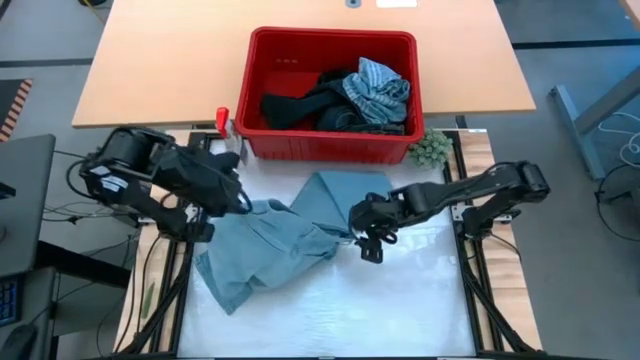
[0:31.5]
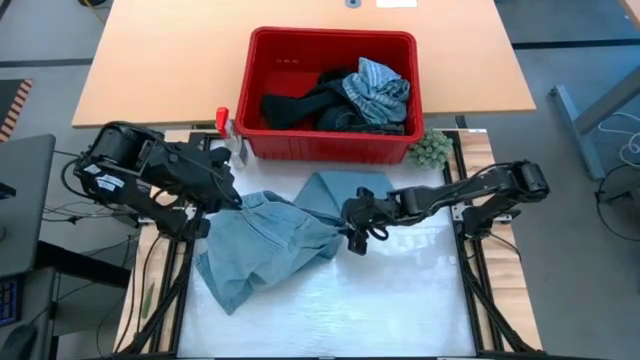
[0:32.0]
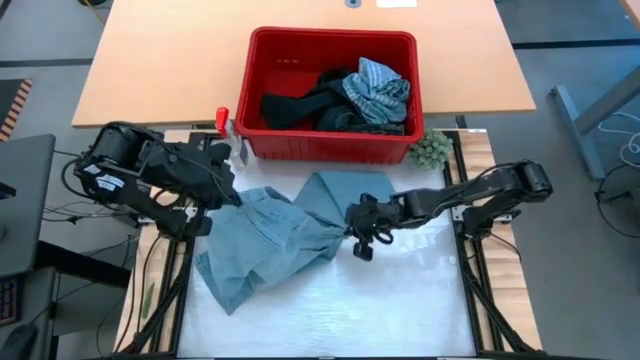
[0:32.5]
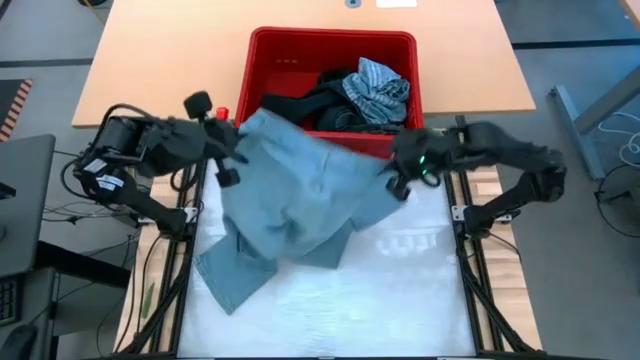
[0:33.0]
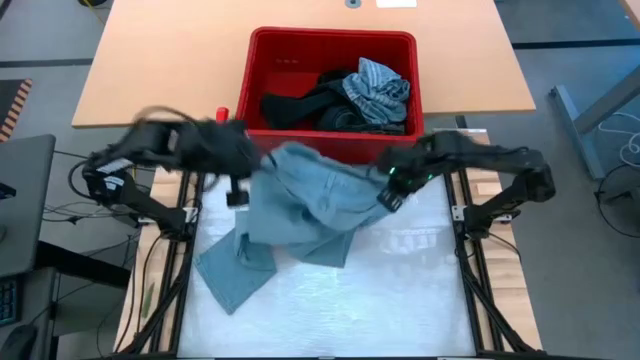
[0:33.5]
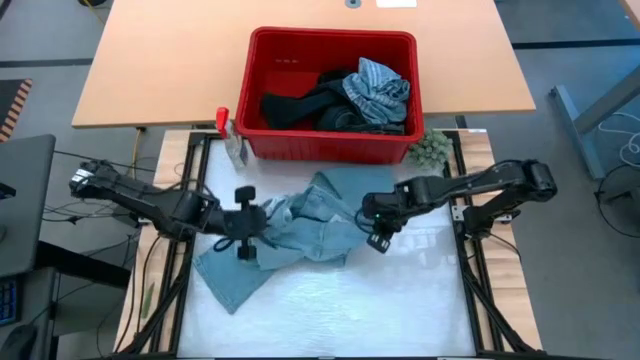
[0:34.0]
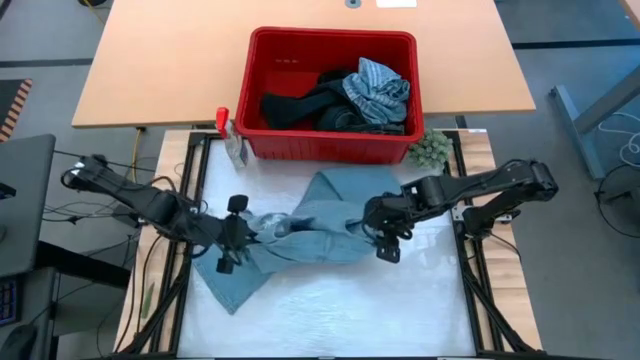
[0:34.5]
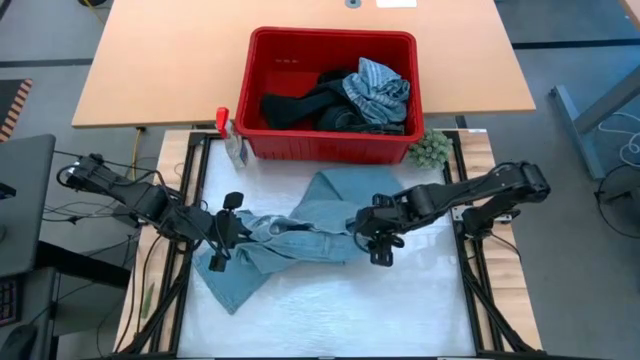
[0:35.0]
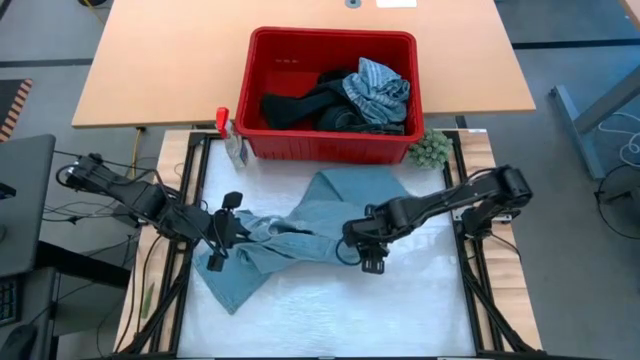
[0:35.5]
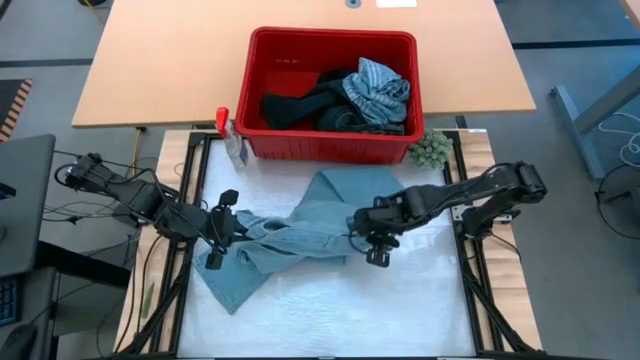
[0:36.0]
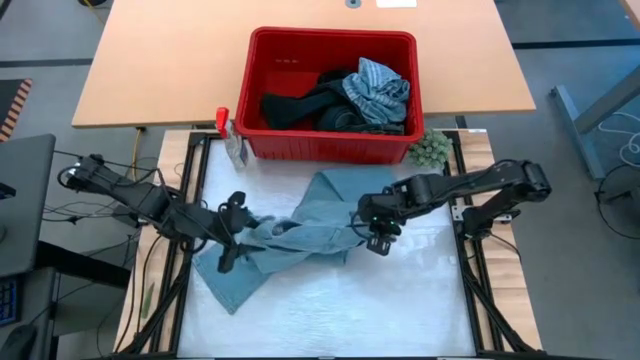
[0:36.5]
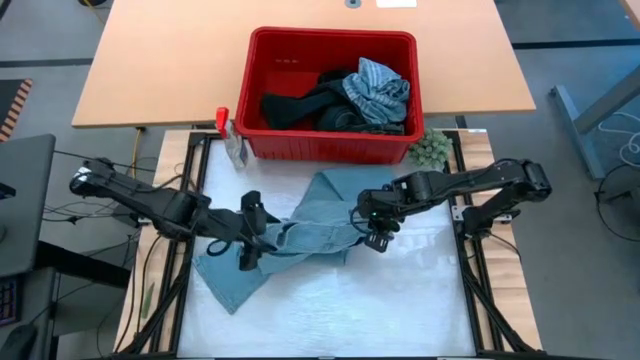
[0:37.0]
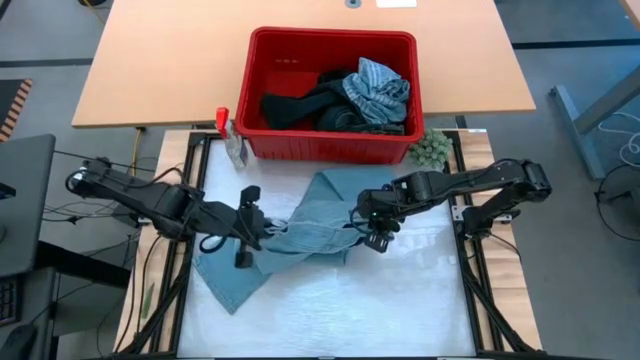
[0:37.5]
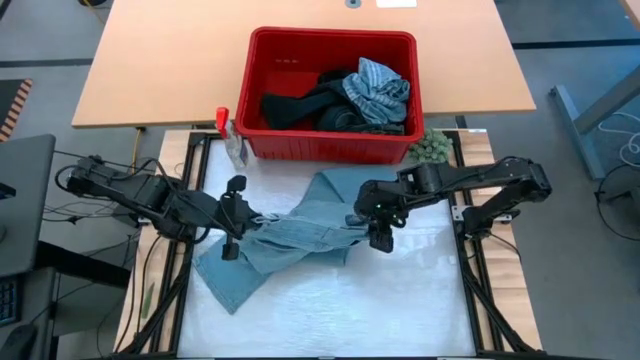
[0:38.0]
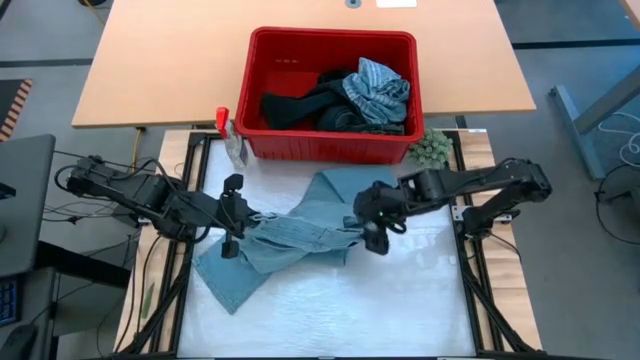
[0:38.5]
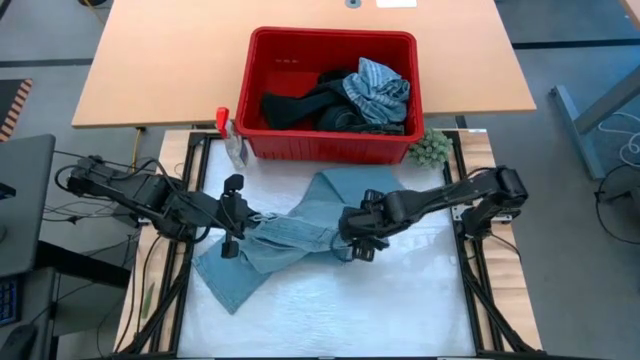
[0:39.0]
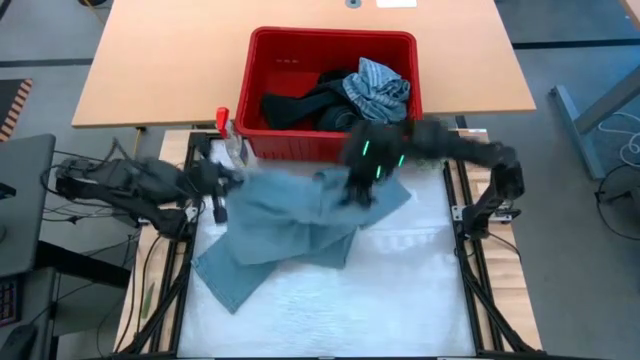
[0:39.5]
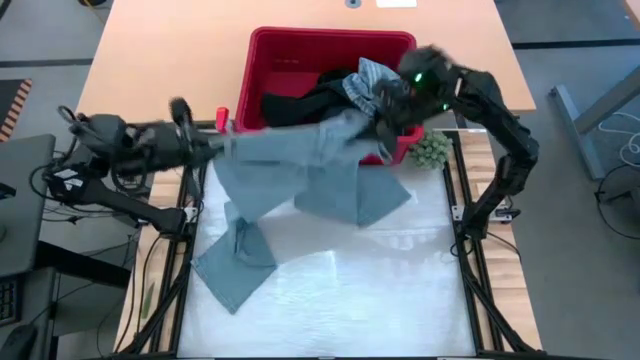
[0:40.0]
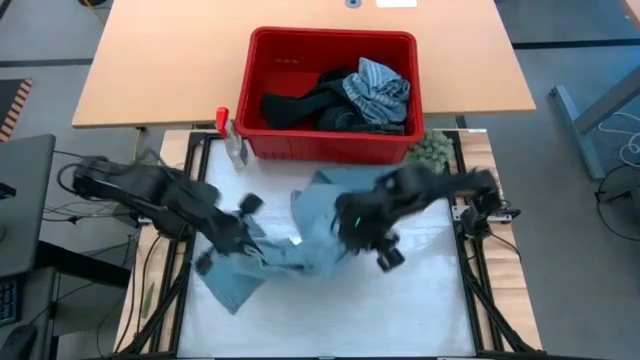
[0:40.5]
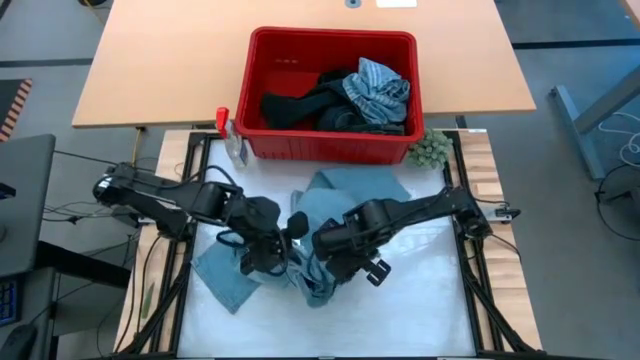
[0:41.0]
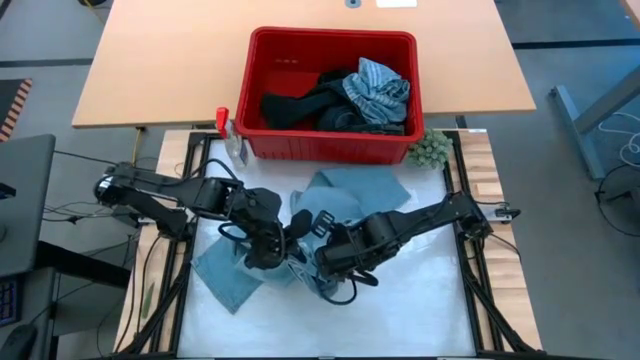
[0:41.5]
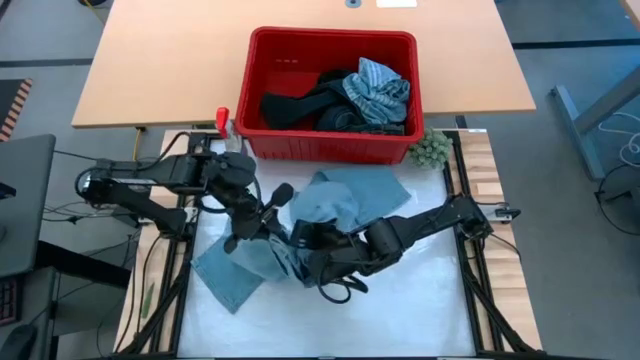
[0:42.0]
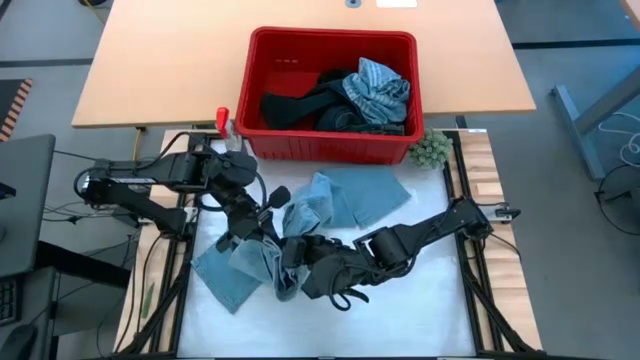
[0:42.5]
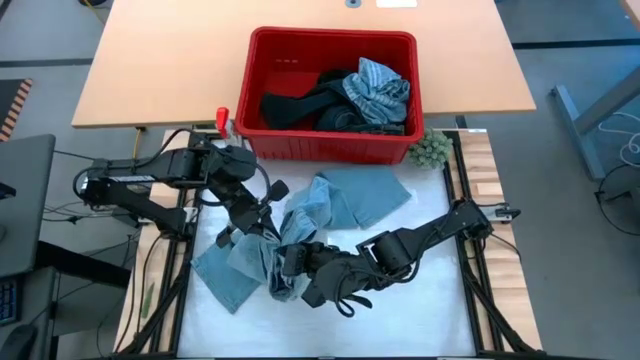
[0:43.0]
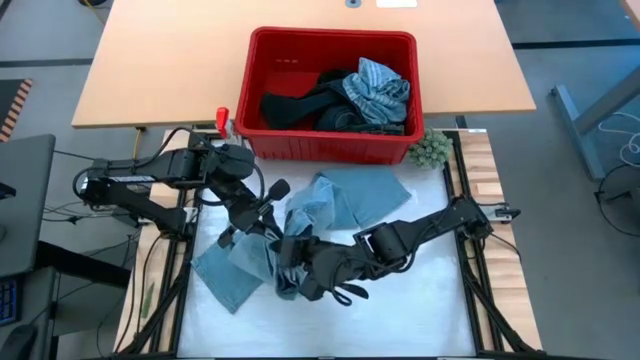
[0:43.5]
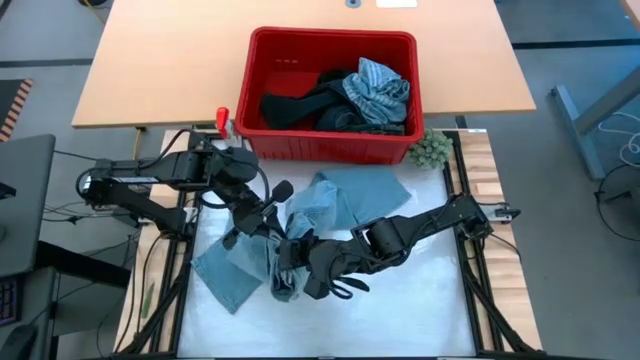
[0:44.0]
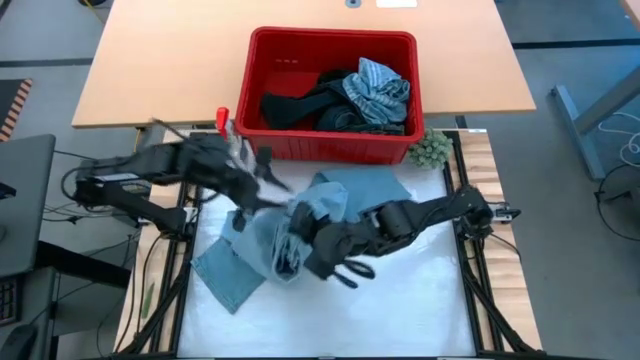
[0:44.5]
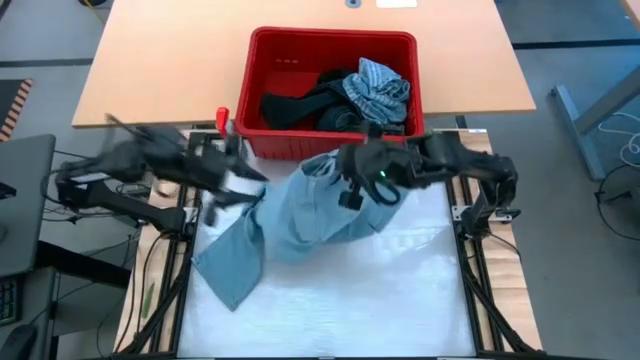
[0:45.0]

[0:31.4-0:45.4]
Task: Fold laundry
Fold the blue pants from the red laundry bin

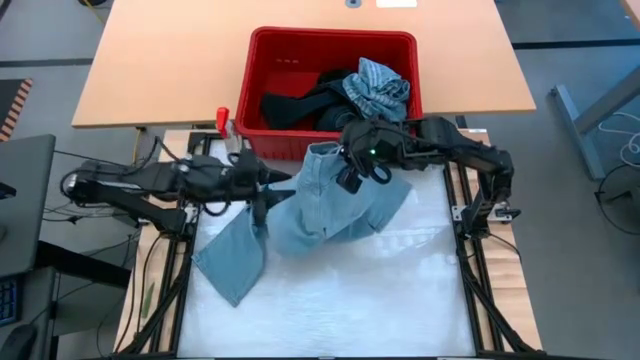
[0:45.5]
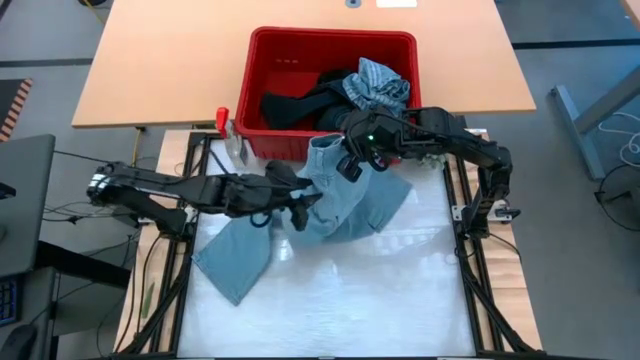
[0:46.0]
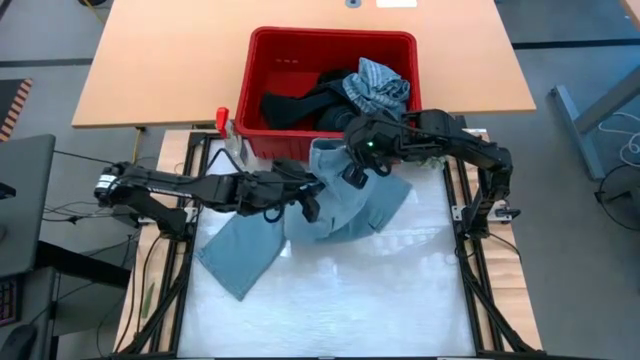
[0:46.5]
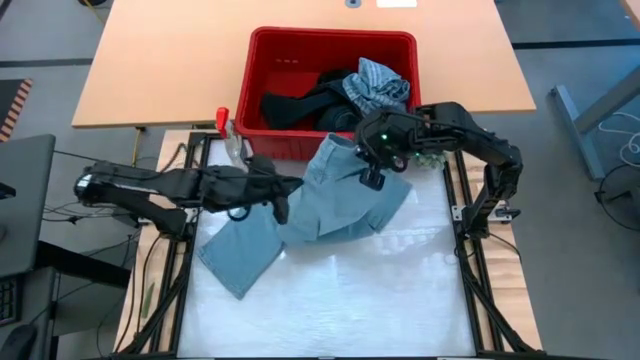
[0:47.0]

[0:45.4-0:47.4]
Fold the blue pants from the red laundry bin

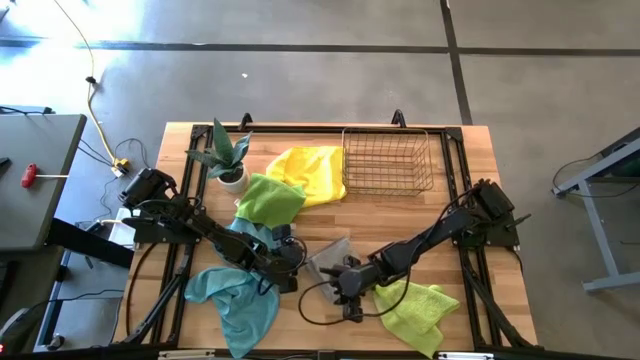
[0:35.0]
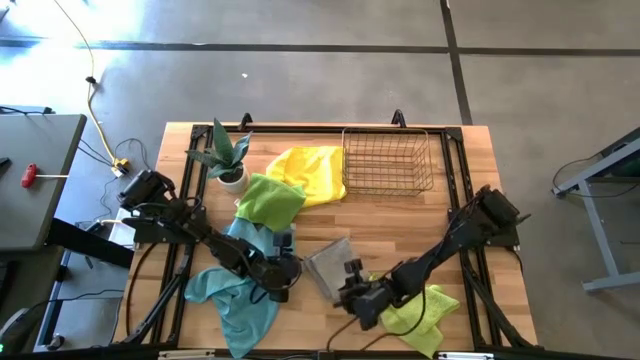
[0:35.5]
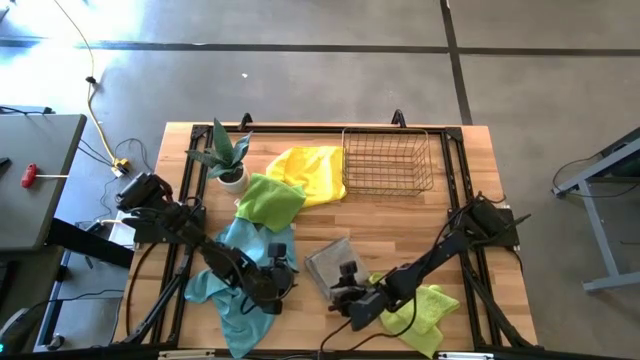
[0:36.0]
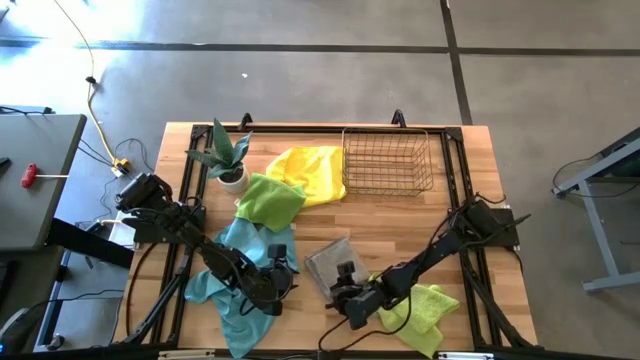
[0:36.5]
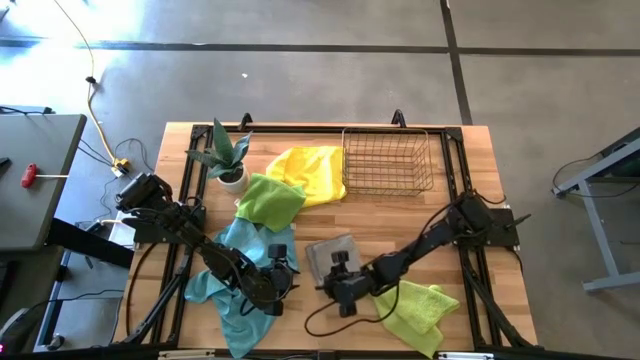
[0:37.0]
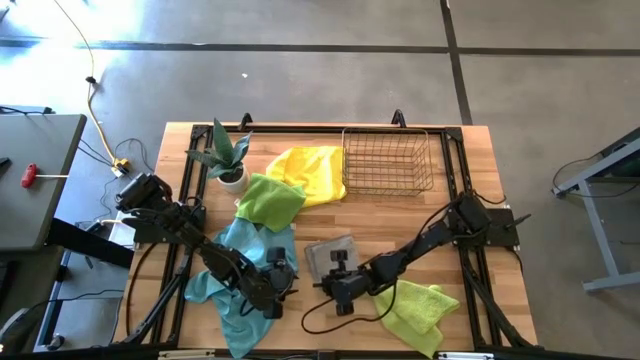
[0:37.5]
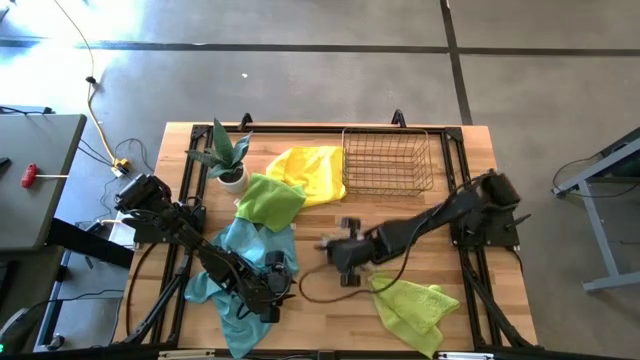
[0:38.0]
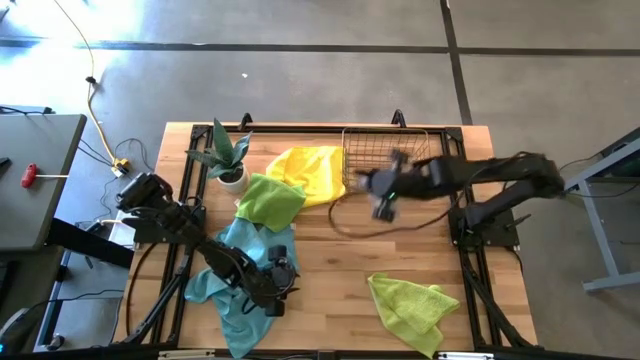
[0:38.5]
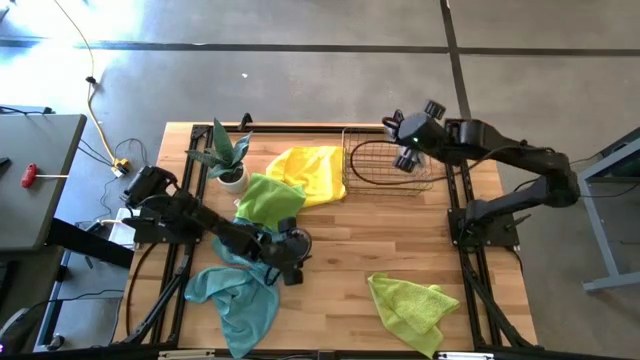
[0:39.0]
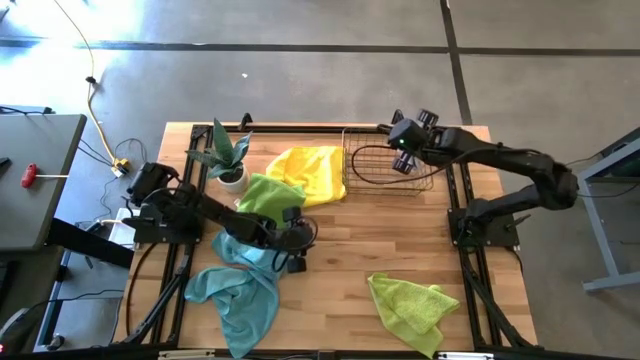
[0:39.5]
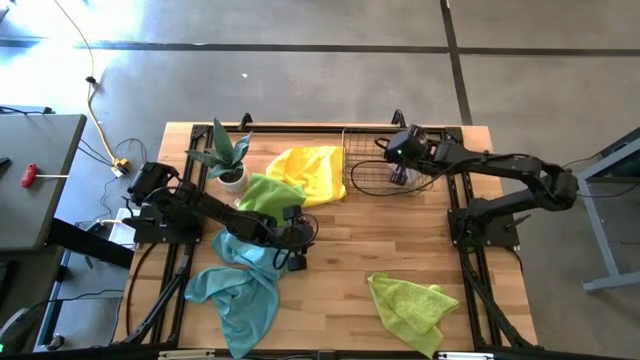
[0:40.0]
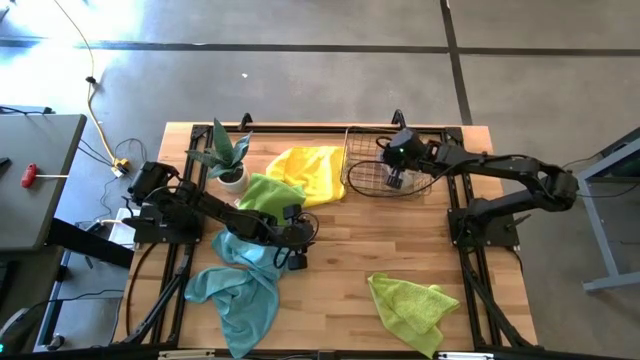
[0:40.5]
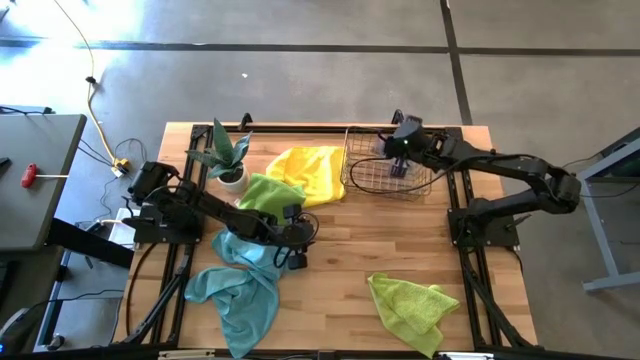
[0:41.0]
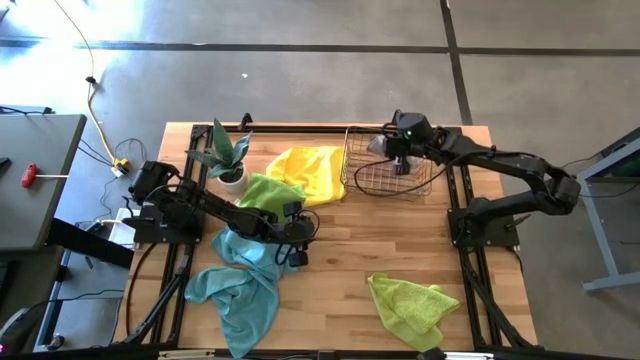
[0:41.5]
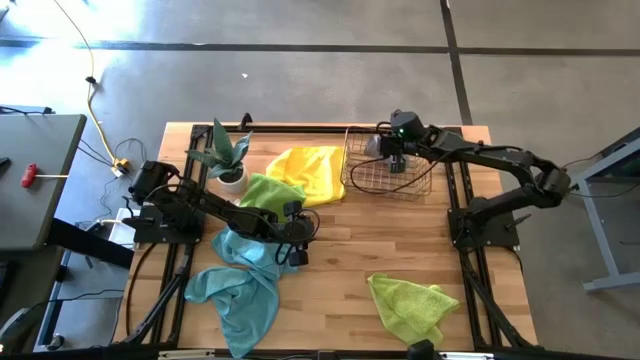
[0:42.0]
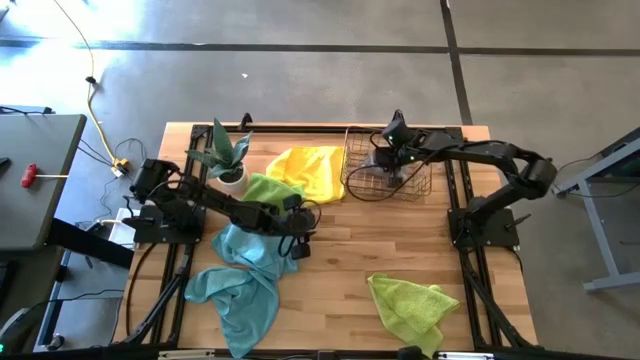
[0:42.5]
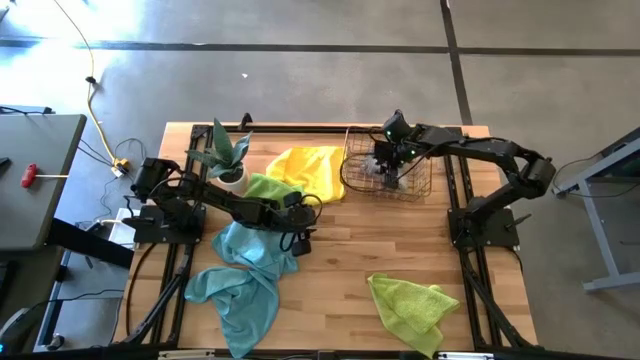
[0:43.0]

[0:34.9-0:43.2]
Task: Fold microfiber towels
Put the gray microfiber towel into the wire basket
